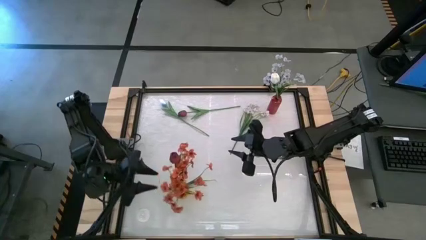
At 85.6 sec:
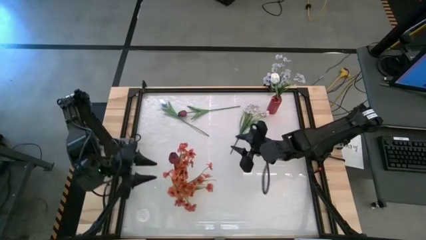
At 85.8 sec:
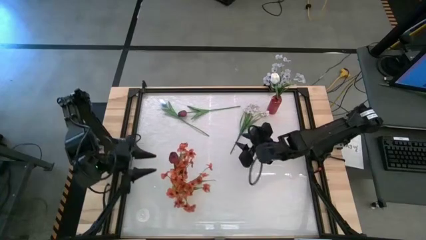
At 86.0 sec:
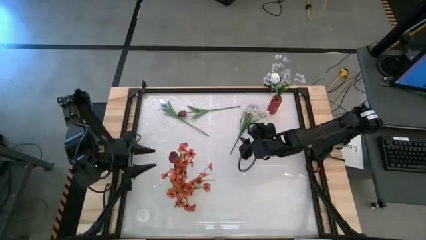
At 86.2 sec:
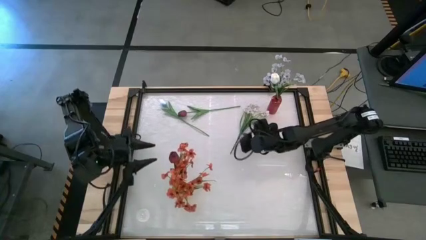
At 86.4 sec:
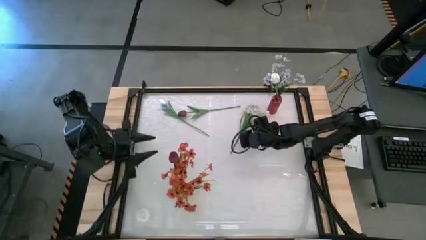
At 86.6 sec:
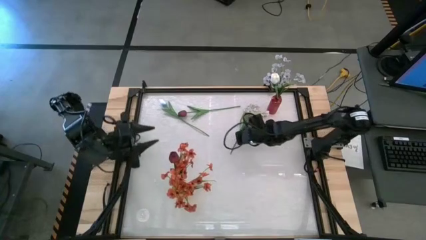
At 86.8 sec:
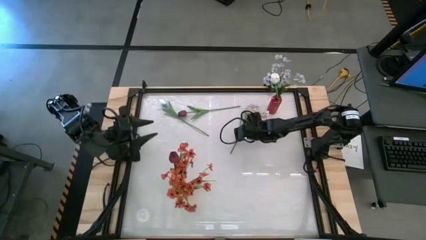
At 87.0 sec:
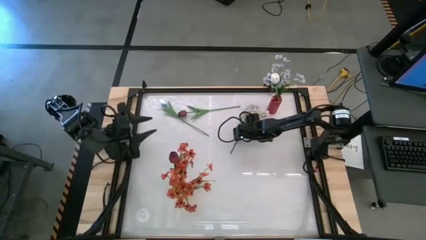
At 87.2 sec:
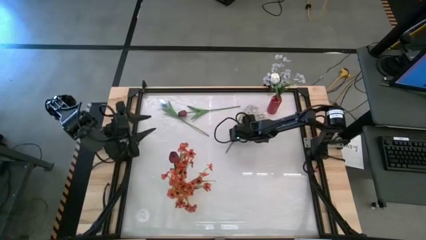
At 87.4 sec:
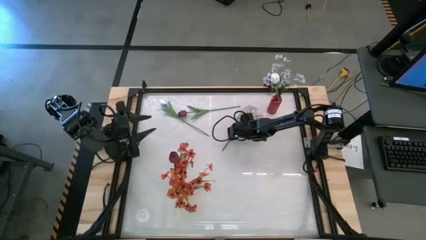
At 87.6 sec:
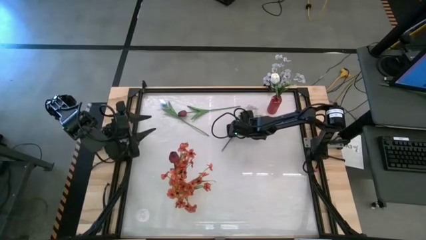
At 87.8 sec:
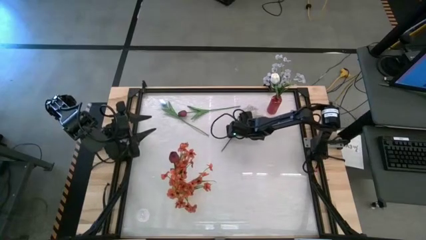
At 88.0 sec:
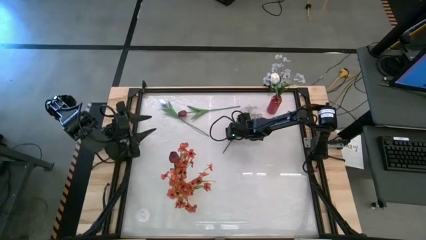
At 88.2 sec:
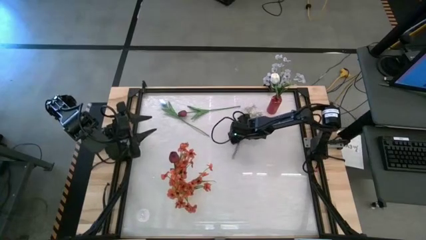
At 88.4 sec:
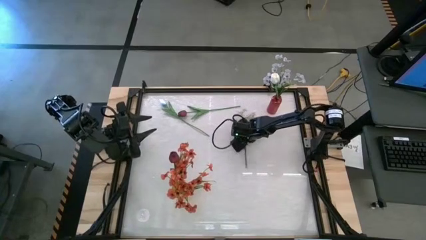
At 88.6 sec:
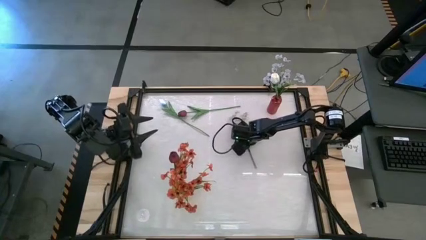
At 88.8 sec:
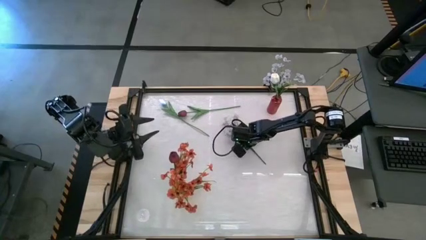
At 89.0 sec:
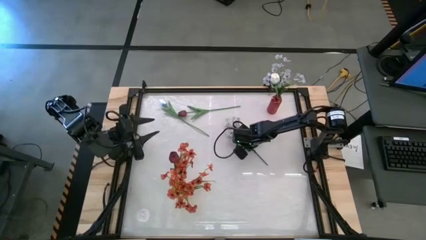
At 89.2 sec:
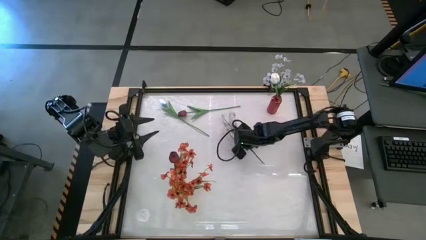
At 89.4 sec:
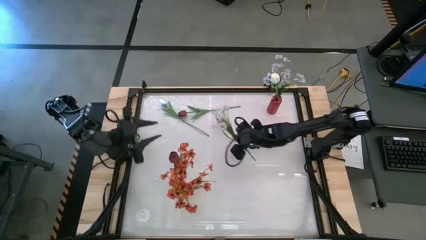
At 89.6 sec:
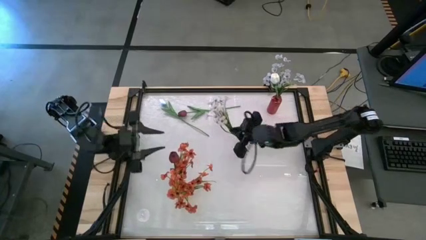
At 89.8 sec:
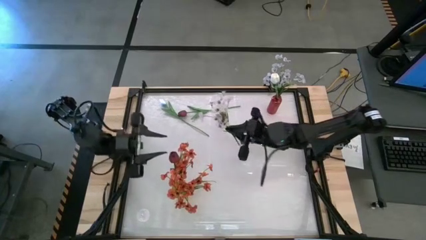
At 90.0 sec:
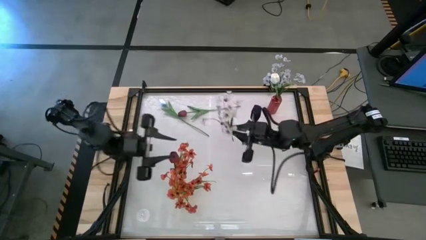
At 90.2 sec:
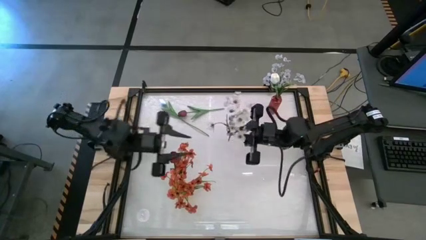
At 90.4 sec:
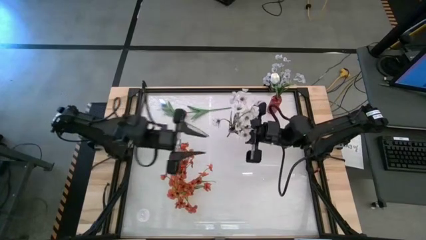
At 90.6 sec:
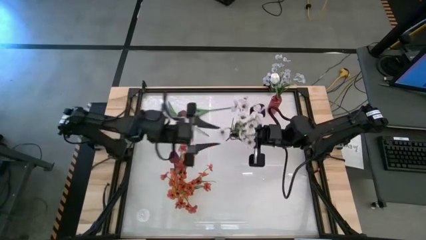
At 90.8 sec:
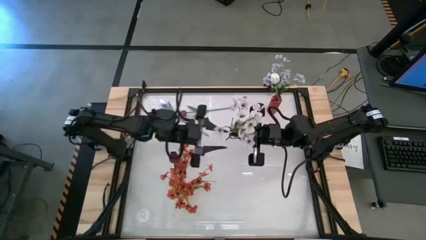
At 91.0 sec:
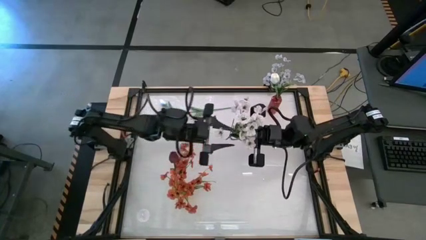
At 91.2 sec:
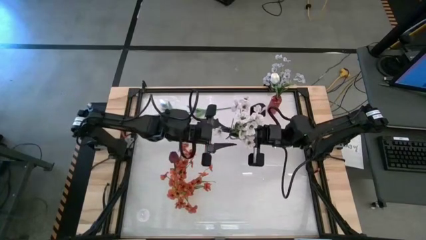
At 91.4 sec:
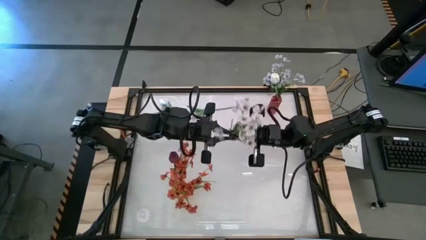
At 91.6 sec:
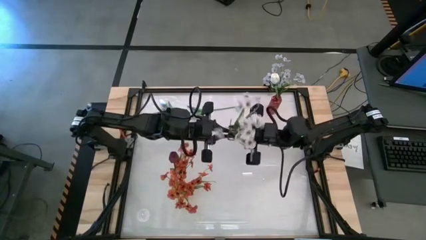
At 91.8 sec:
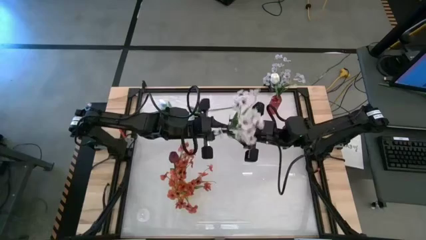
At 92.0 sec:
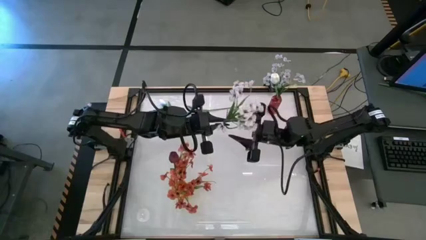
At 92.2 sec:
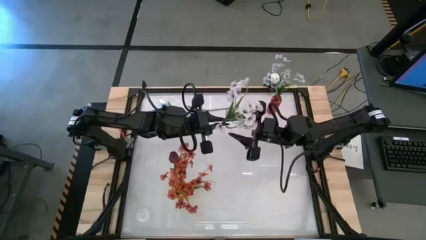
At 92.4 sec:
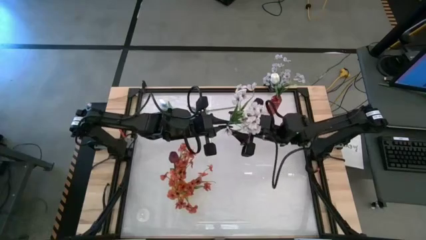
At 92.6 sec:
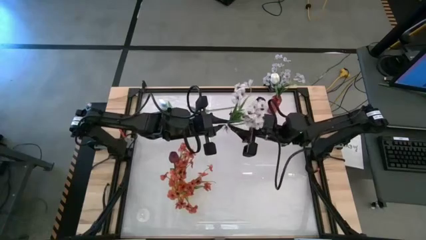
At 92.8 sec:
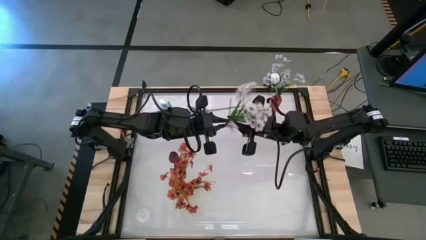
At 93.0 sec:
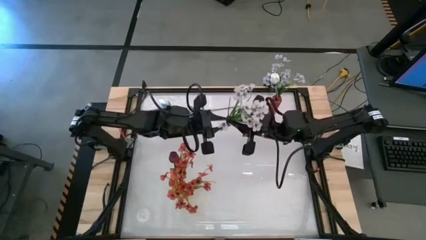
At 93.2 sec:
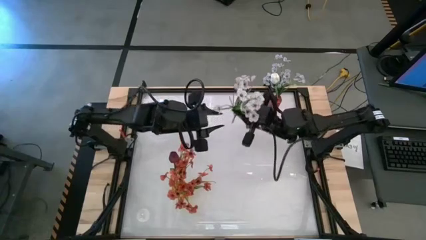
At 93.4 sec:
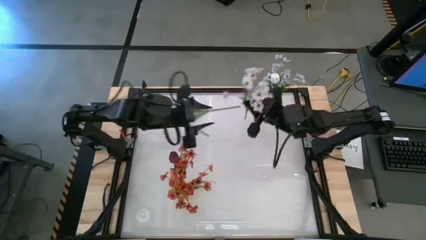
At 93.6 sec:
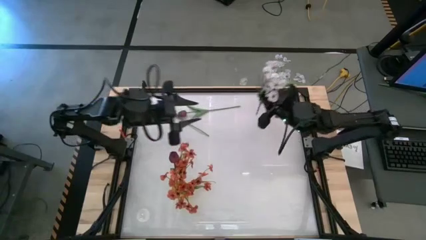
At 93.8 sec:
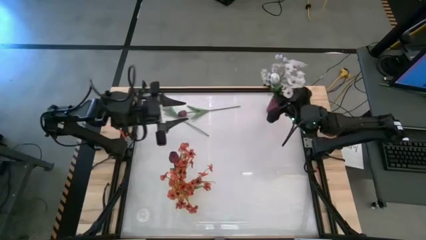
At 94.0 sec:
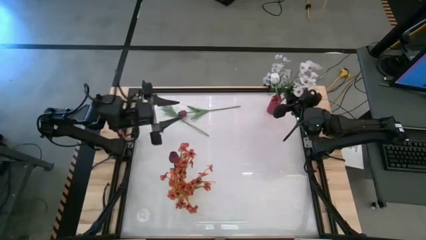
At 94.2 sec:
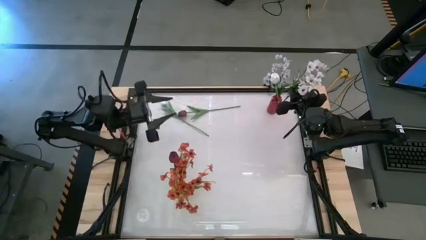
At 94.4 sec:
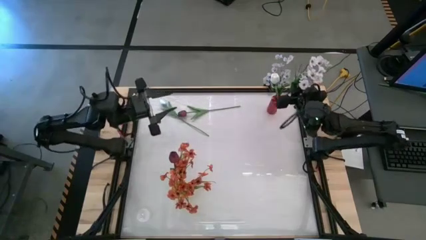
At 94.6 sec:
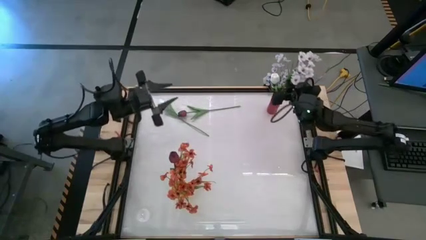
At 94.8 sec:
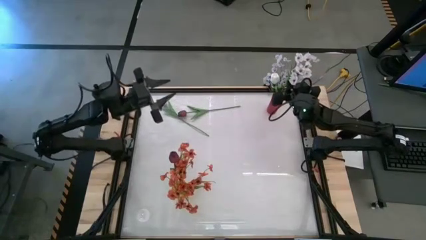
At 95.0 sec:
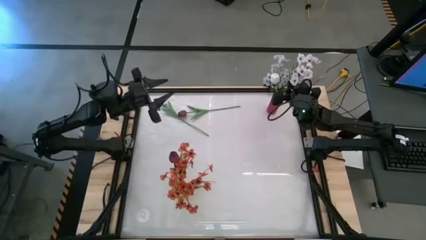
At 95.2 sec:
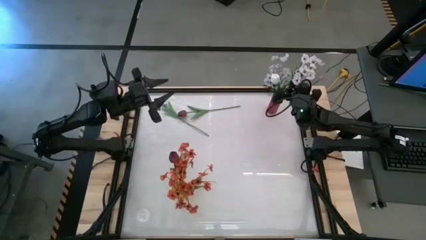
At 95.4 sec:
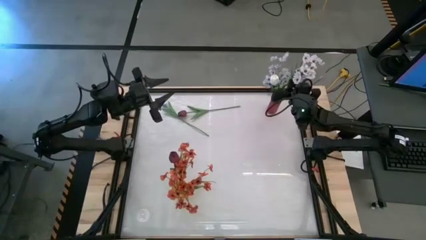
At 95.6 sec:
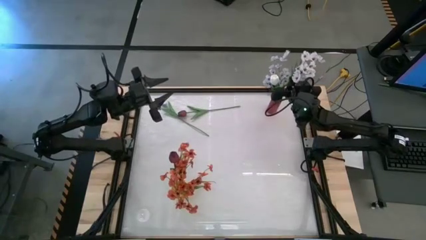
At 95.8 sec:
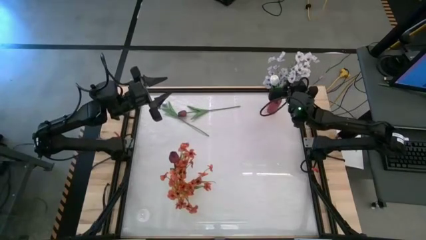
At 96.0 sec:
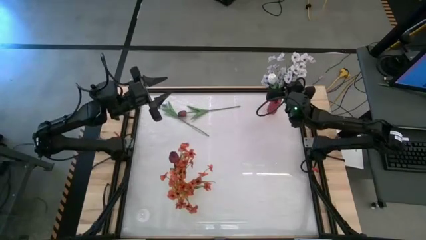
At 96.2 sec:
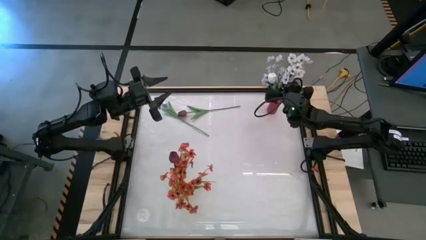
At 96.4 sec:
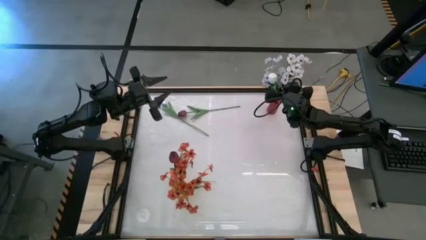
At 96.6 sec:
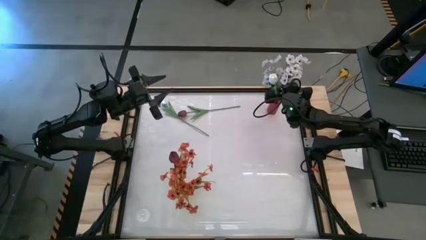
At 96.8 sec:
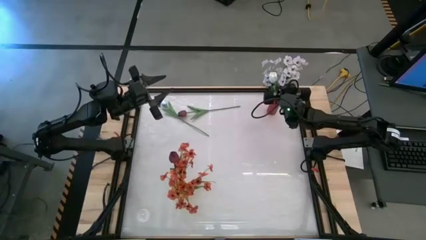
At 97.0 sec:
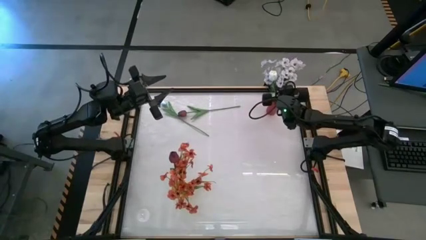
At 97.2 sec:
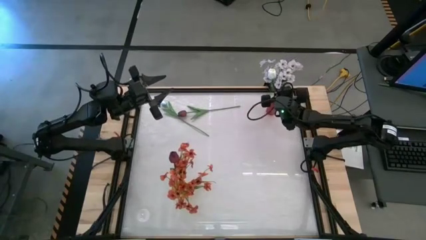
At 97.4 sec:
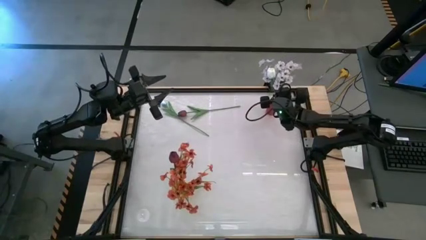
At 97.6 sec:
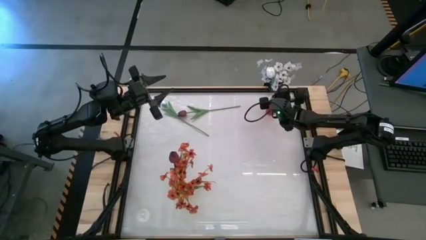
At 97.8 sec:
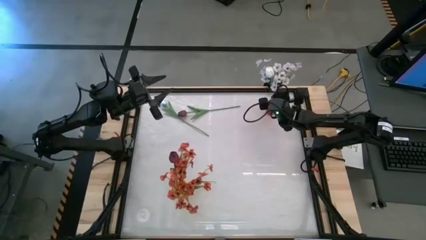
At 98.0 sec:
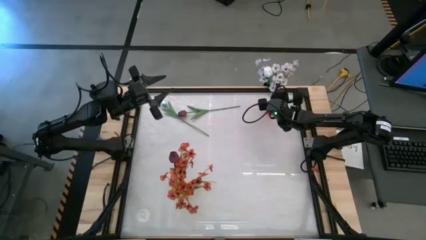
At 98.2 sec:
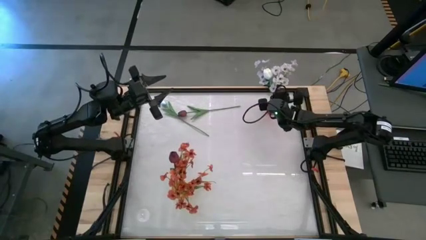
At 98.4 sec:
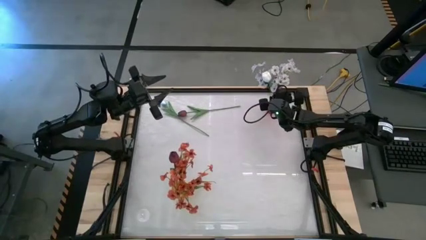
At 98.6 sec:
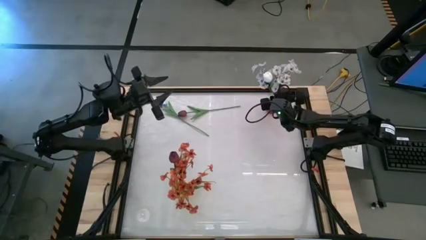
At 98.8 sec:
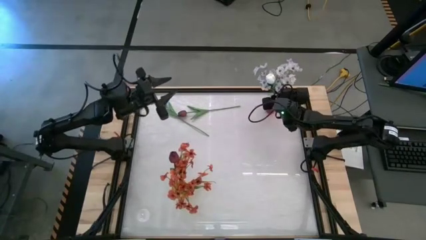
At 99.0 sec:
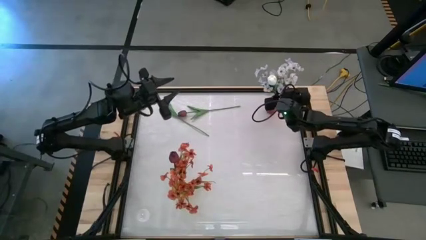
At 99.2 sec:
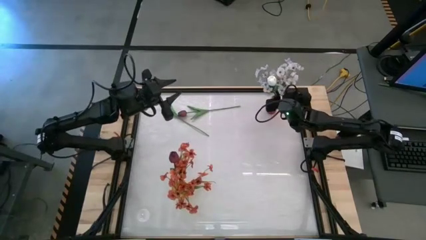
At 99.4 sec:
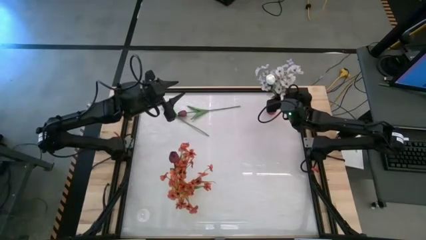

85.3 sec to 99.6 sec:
Task: Sort flowers into vase by color
Put the white flowers into the red vase

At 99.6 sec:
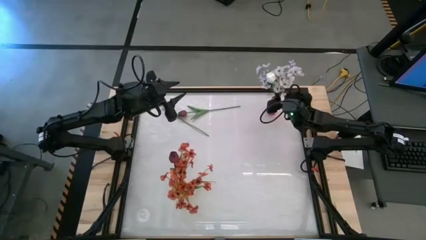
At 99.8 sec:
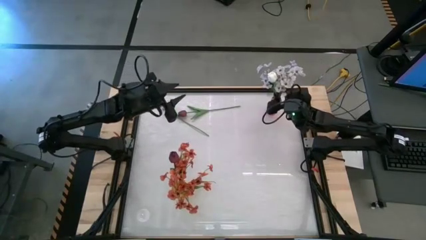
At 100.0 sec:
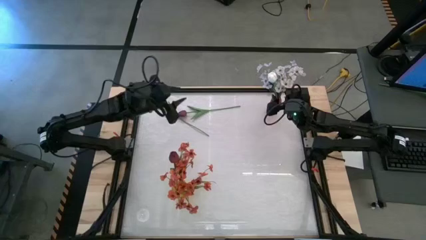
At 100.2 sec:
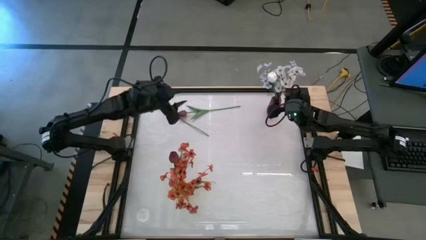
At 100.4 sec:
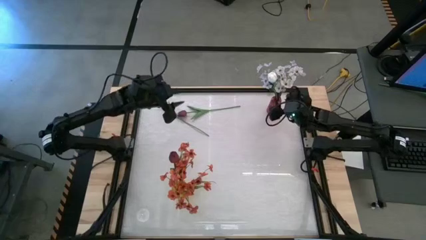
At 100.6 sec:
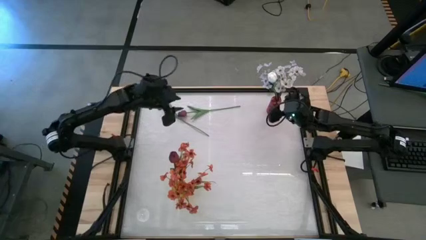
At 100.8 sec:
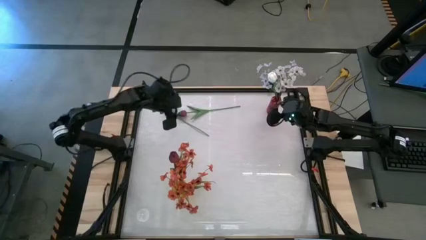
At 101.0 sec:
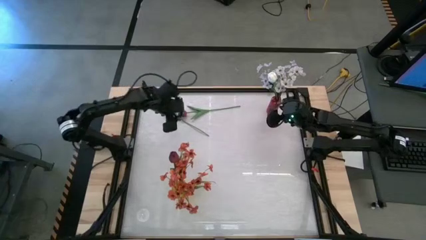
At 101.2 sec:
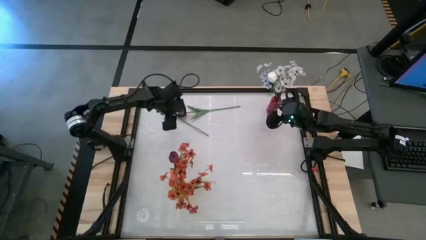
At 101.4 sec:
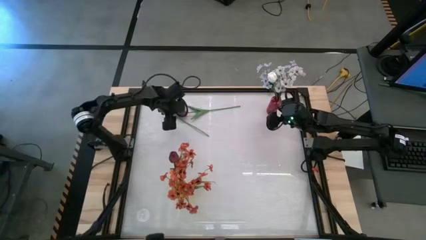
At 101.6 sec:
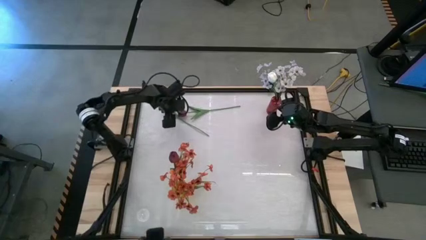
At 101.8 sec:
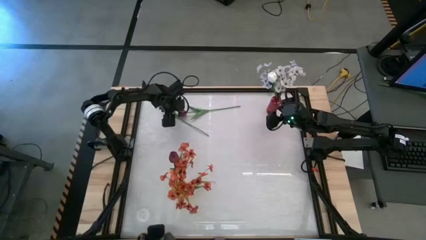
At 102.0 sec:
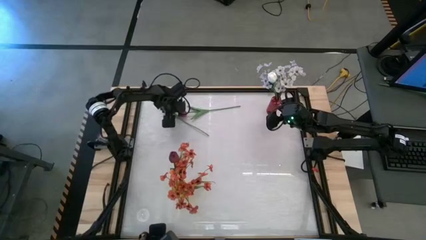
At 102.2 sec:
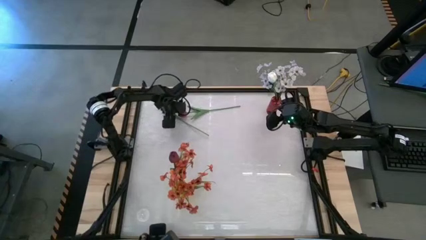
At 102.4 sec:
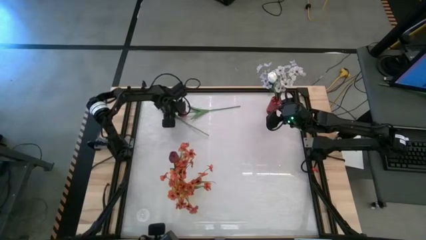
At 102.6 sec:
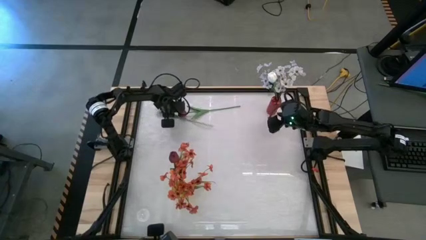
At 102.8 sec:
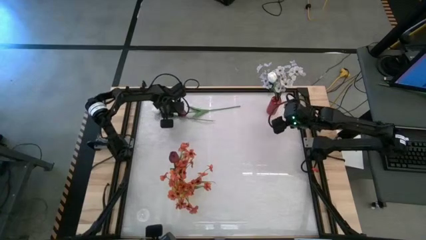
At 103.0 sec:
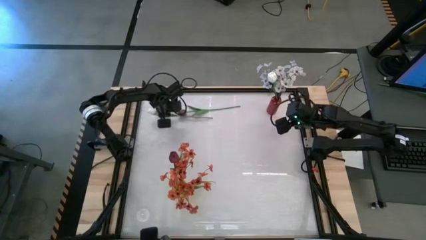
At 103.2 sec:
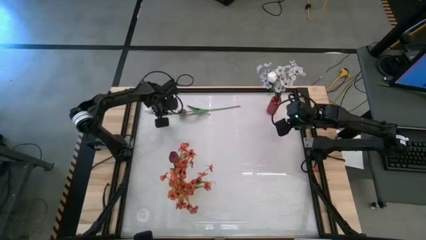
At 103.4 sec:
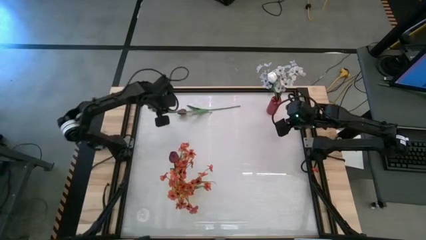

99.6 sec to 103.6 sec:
Put the white tulip into the red vase
